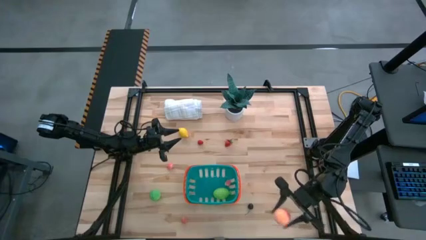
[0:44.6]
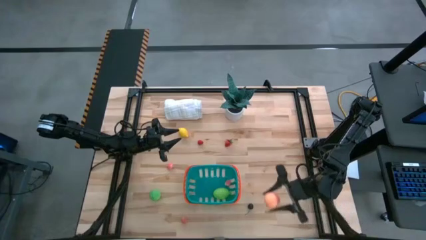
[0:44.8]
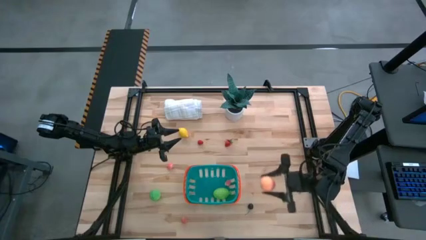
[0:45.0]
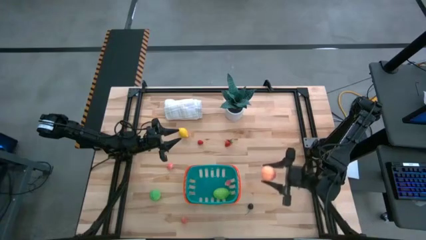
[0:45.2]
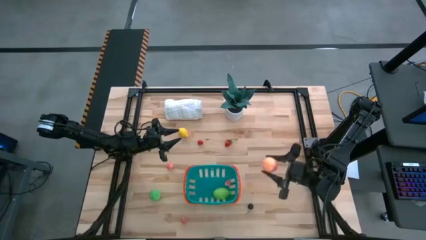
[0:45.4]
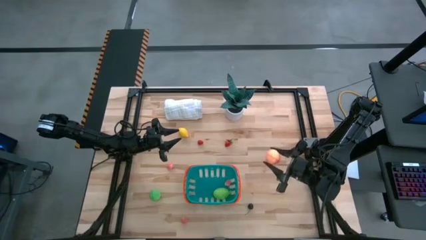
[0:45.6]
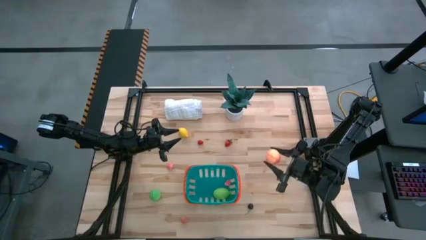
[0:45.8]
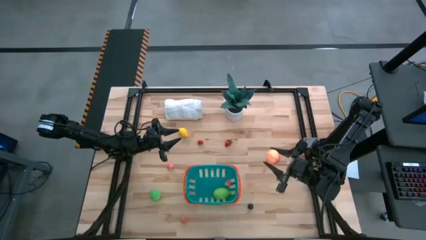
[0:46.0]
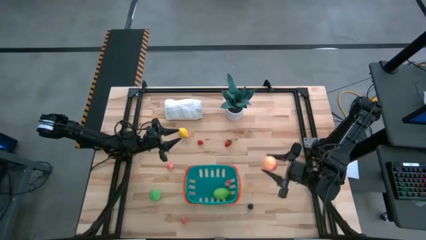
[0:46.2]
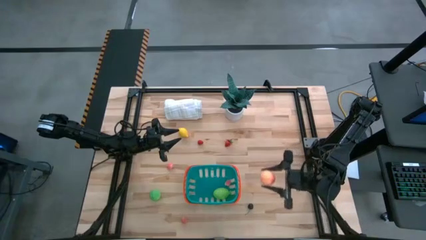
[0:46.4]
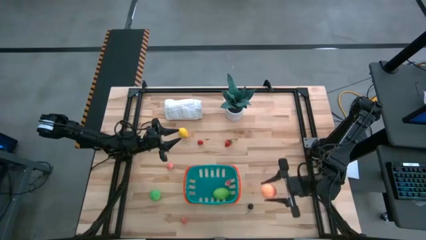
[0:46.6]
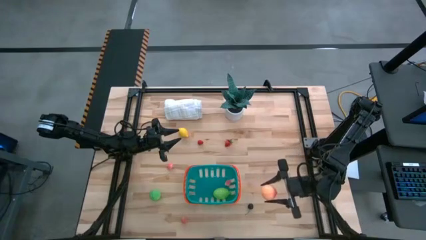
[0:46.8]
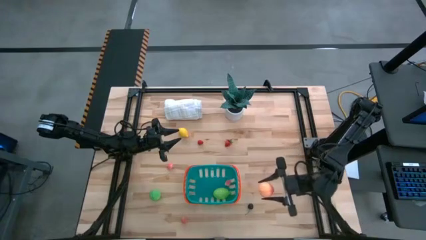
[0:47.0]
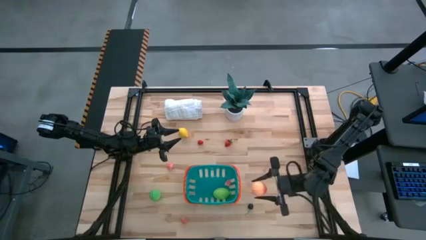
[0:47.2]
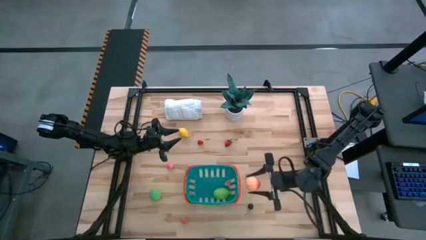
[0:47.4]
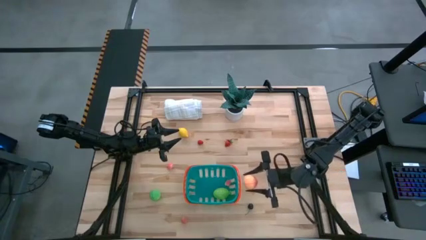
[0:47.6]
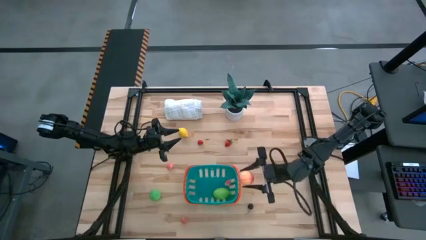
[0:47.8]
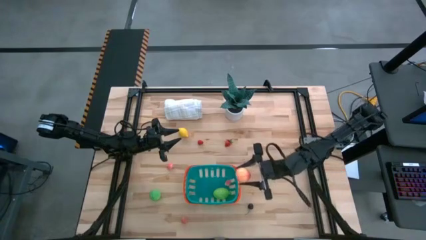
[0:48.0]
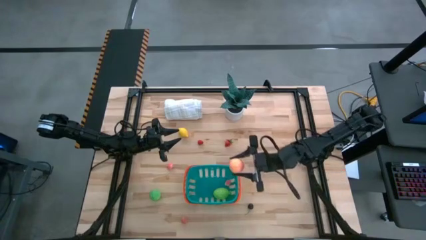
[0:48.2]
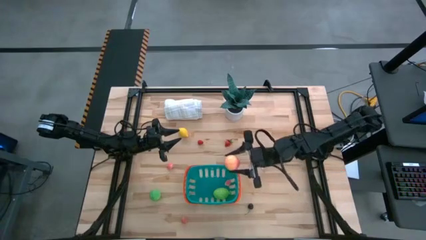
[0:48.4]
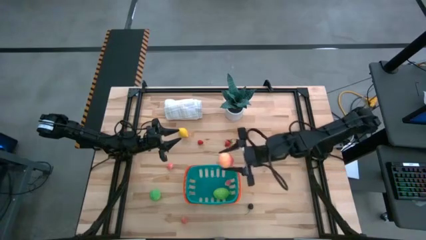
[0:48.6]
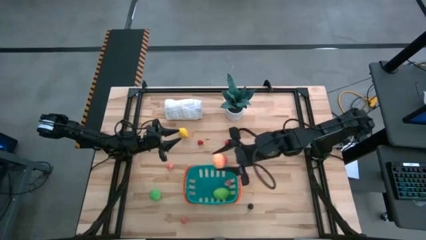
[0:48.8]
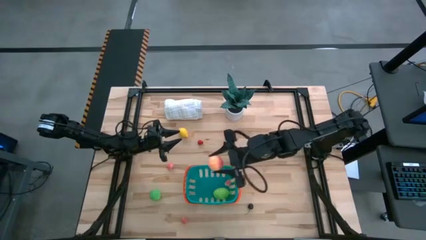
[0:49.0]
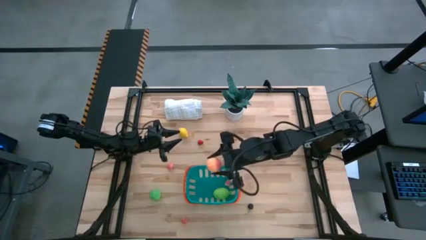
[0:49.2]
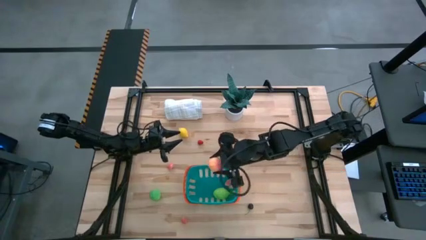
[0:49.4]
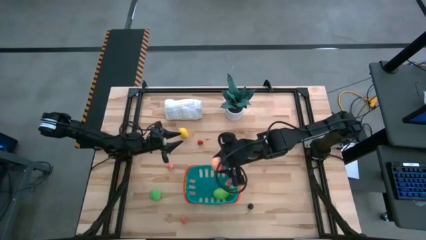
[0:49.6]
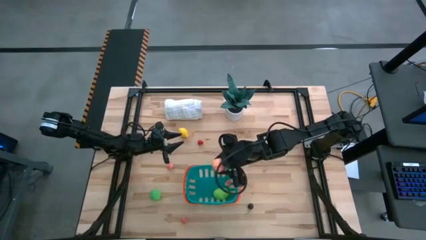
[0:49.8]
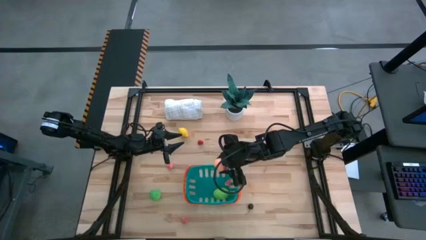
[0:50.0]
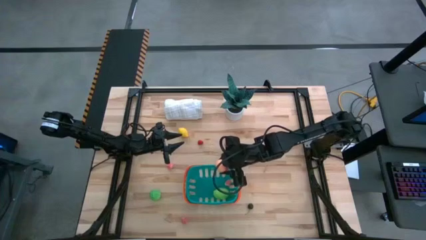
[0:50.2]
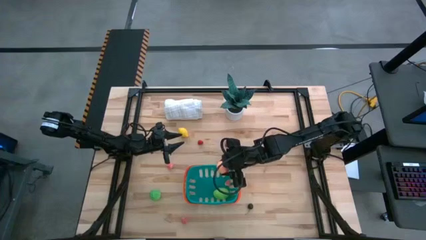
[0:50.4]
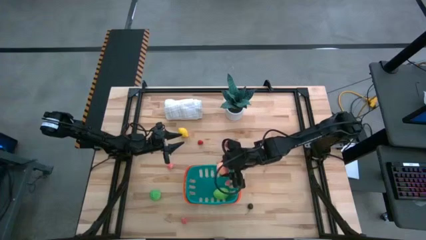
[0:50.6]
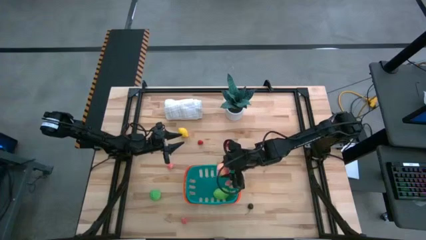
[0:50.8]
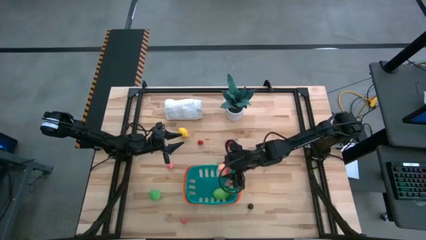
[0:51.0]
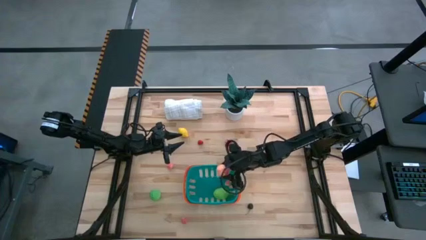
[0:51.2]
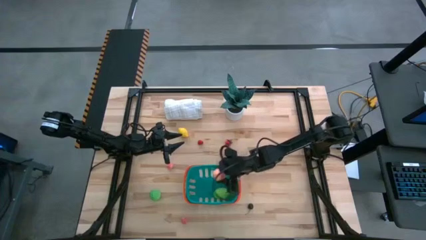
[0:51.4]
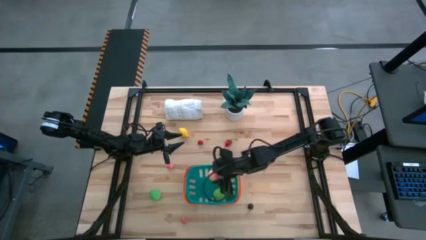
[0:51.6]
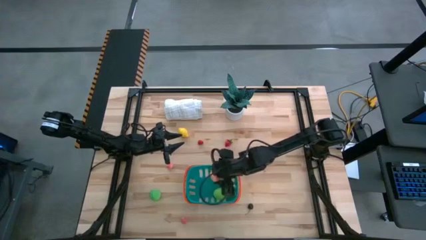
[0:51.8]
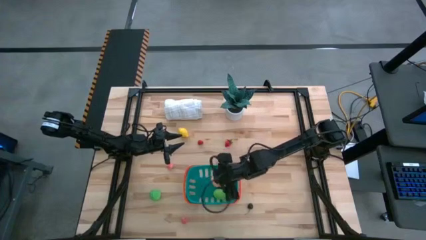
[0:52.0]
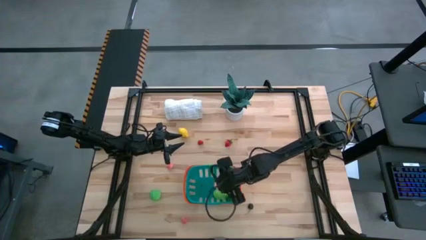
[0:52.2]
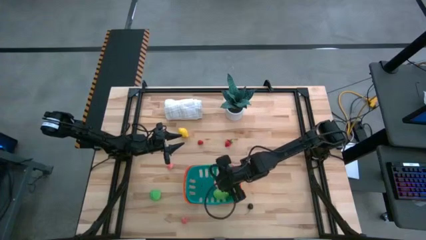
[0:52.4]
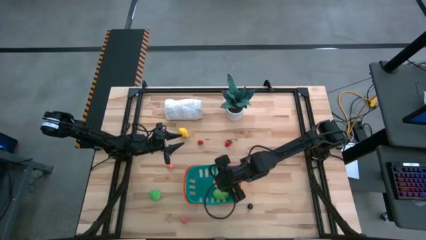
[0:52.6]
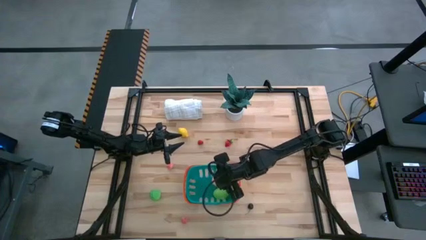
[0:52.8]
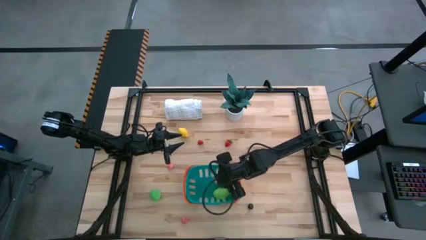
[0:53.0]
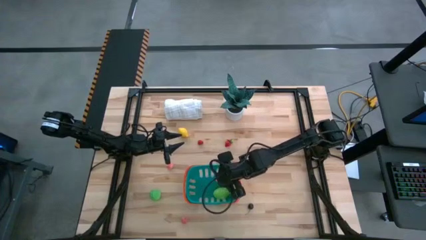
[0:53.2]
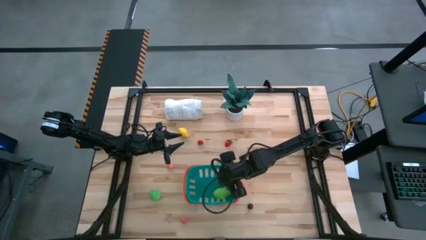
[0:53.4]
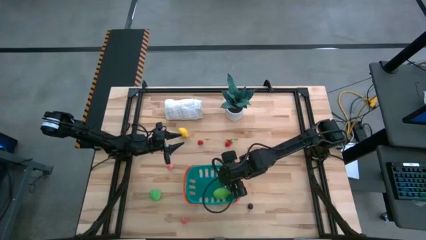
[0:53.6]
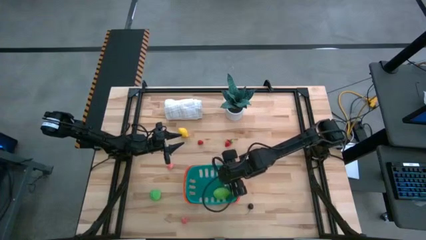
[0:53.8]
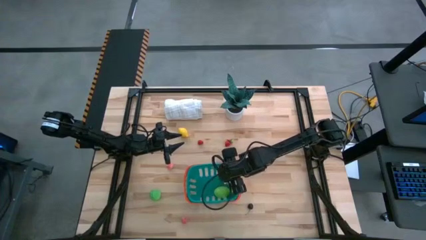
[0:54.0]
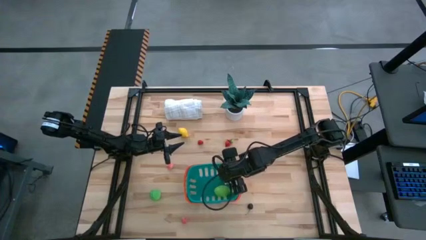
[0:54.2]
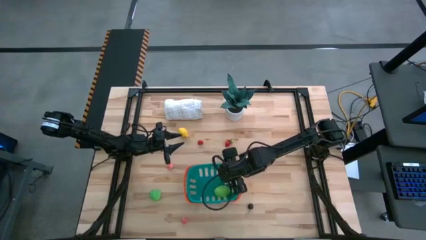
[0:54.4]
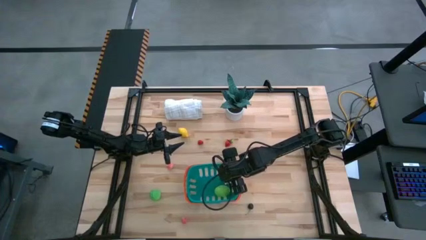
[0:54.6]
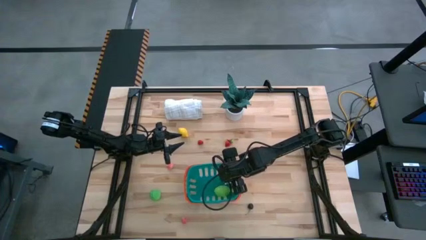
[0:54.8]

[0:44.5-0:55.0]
Task: Pick and placing Produce into tupperware
Put the large pink peach into the blue bin
